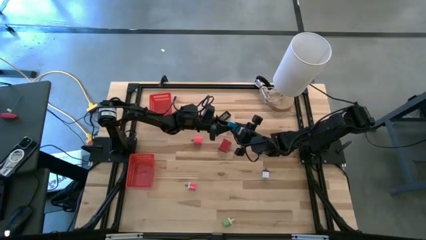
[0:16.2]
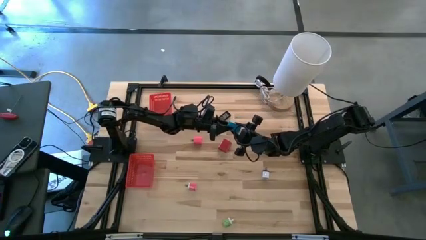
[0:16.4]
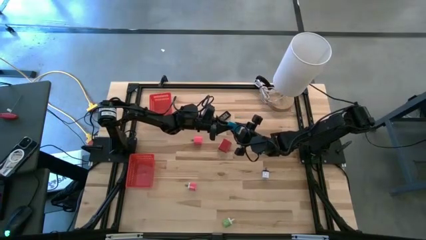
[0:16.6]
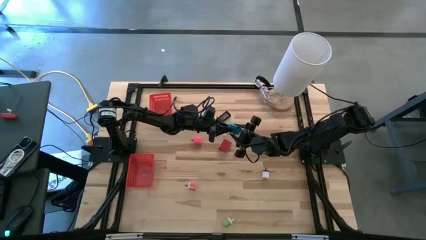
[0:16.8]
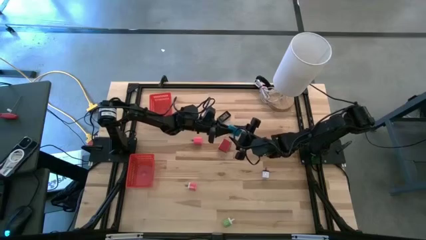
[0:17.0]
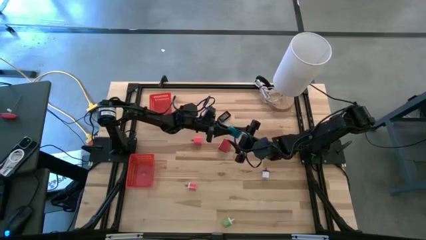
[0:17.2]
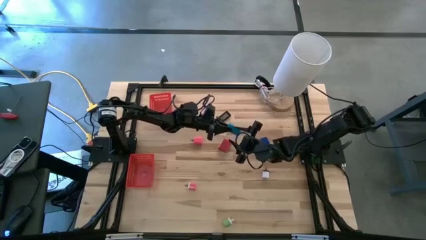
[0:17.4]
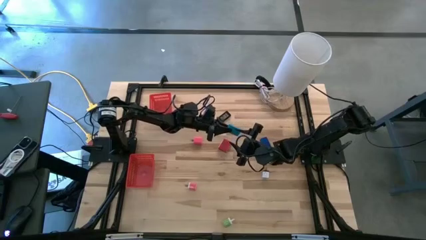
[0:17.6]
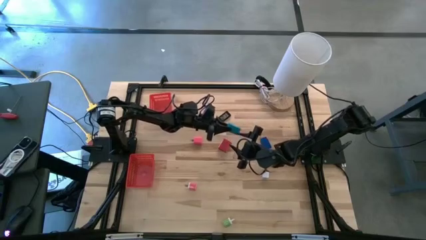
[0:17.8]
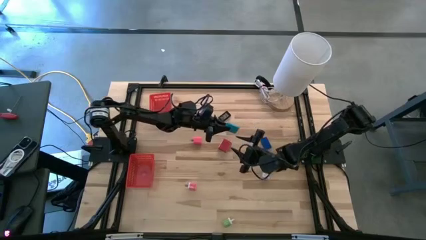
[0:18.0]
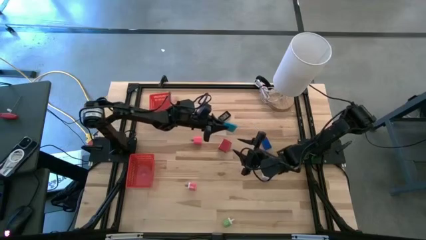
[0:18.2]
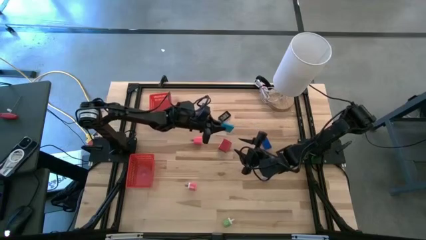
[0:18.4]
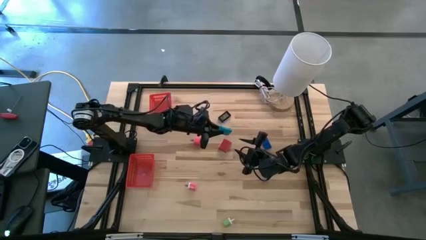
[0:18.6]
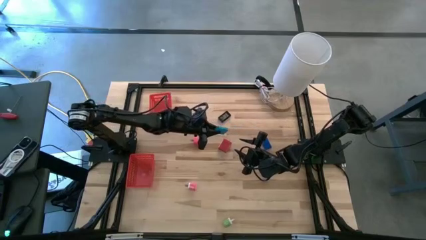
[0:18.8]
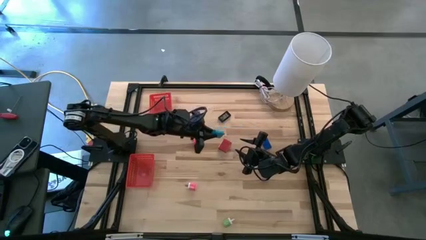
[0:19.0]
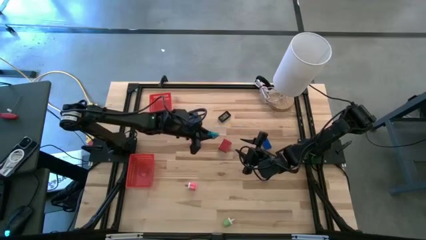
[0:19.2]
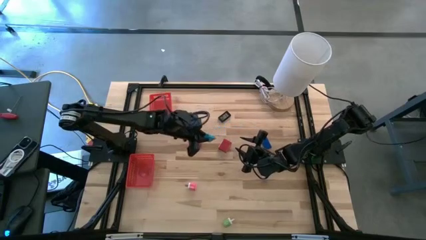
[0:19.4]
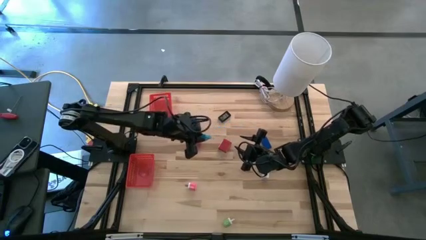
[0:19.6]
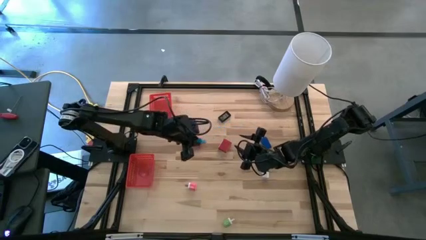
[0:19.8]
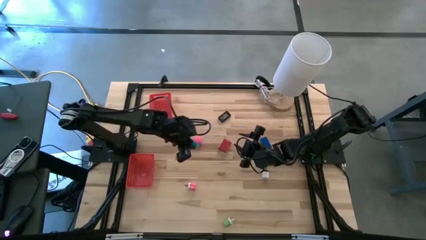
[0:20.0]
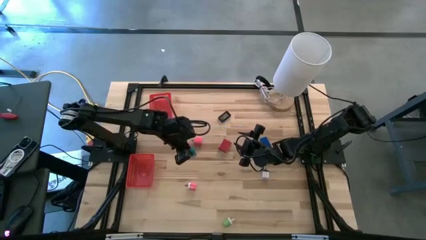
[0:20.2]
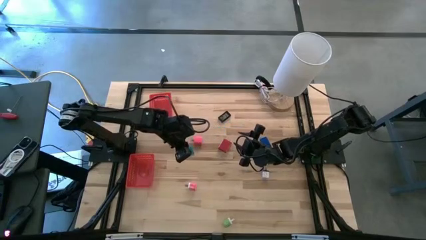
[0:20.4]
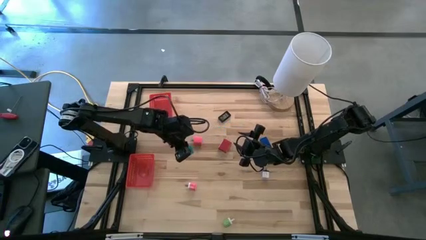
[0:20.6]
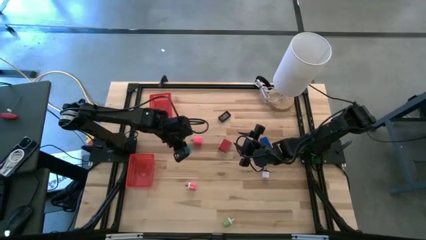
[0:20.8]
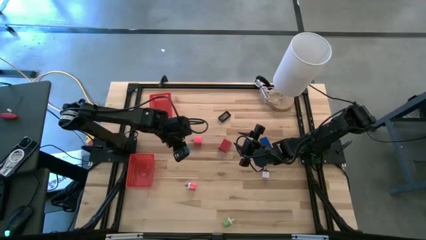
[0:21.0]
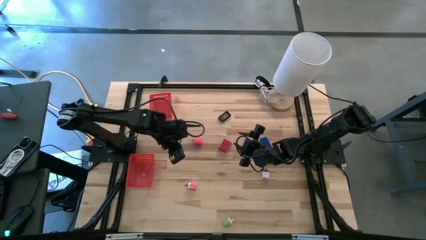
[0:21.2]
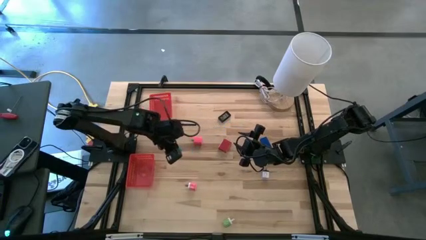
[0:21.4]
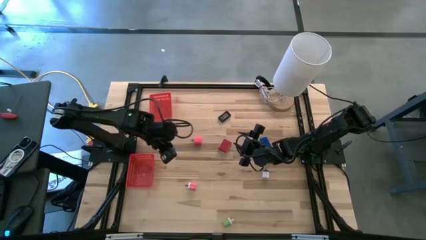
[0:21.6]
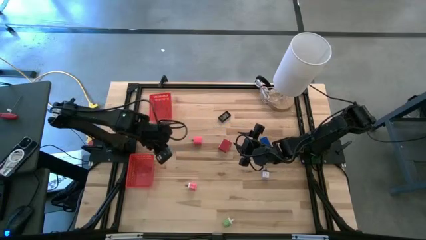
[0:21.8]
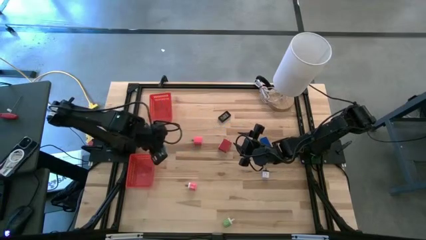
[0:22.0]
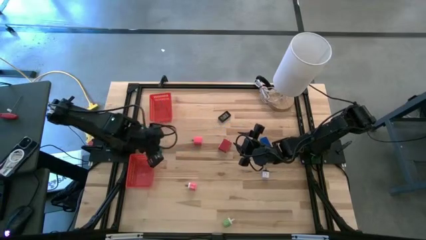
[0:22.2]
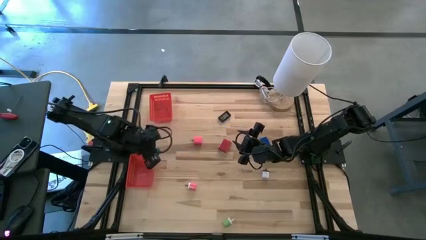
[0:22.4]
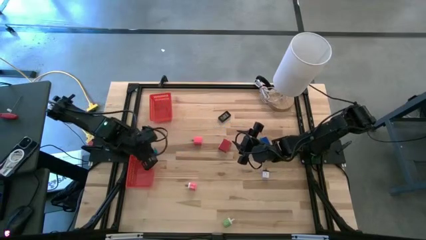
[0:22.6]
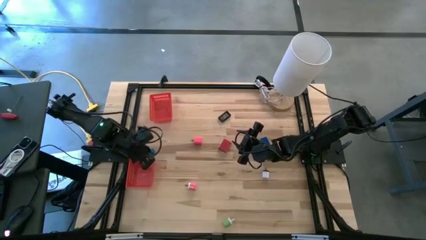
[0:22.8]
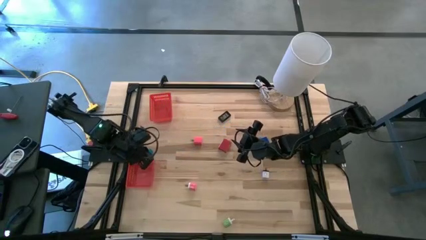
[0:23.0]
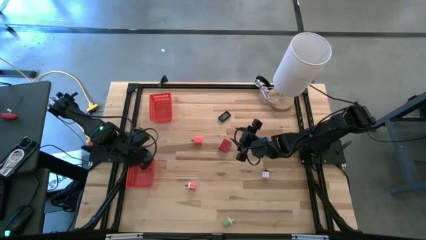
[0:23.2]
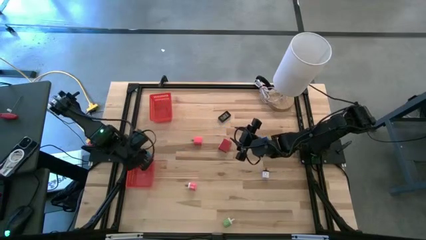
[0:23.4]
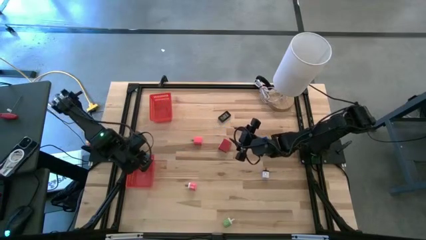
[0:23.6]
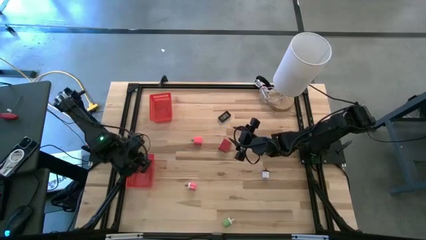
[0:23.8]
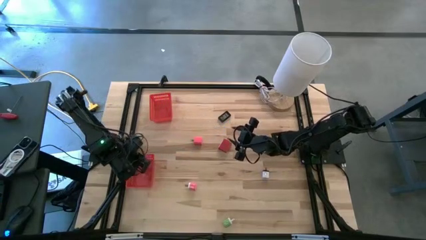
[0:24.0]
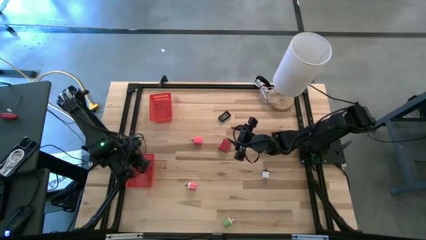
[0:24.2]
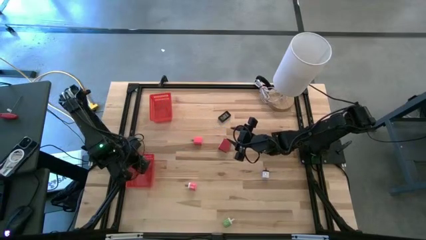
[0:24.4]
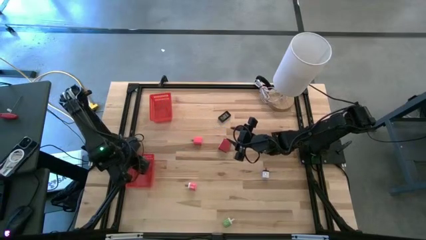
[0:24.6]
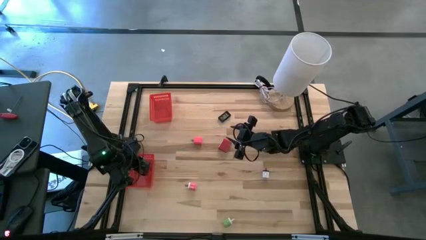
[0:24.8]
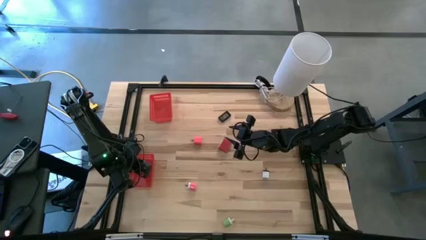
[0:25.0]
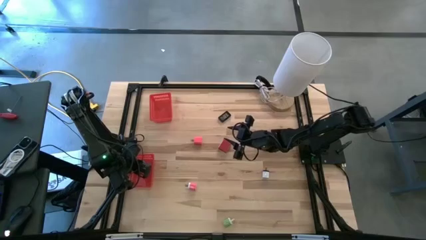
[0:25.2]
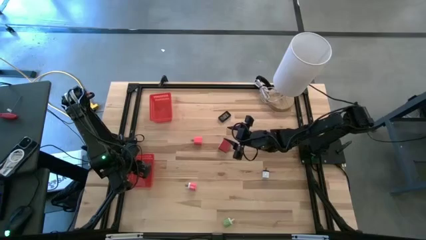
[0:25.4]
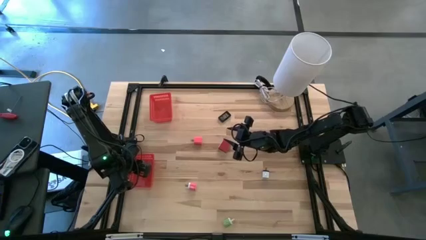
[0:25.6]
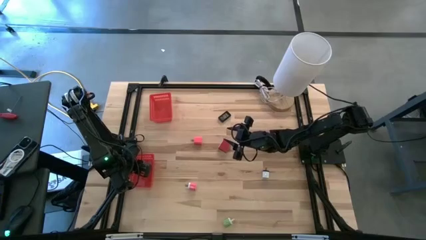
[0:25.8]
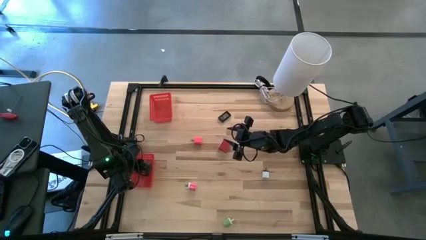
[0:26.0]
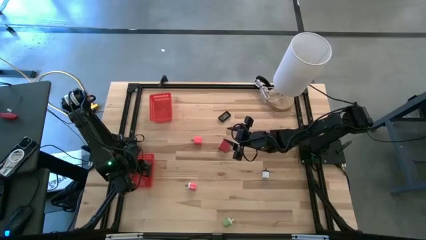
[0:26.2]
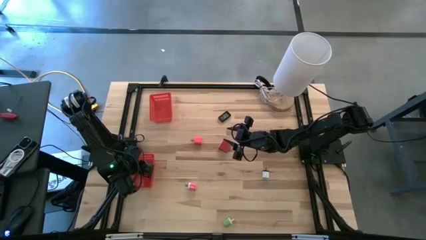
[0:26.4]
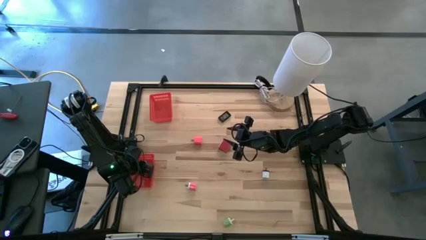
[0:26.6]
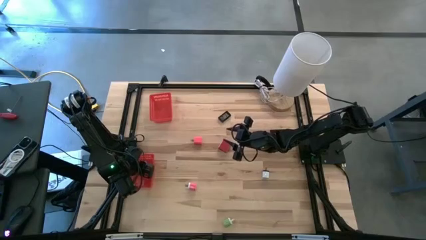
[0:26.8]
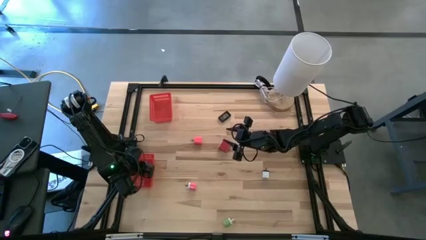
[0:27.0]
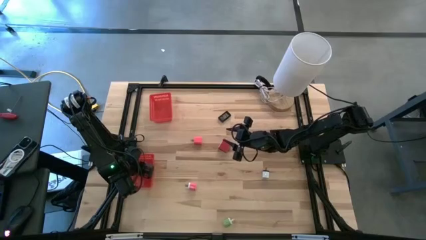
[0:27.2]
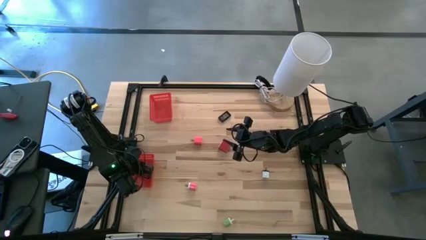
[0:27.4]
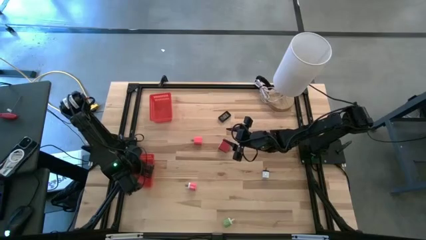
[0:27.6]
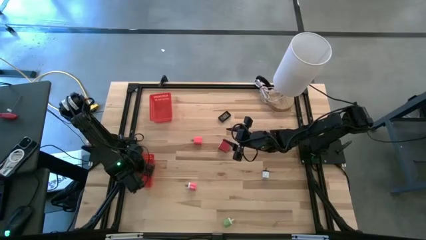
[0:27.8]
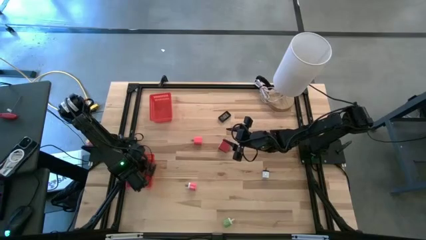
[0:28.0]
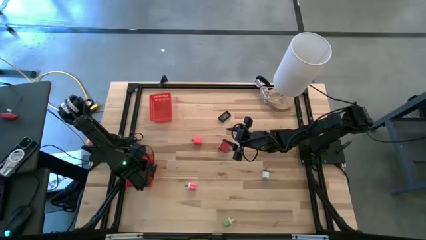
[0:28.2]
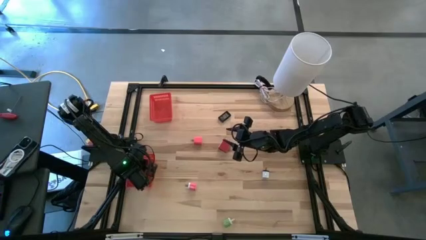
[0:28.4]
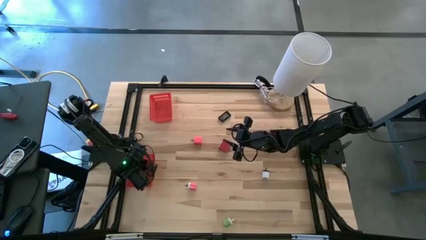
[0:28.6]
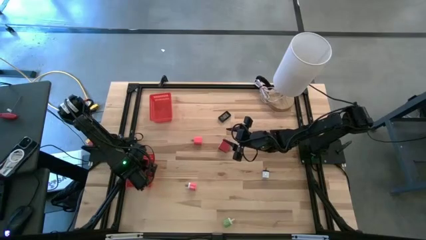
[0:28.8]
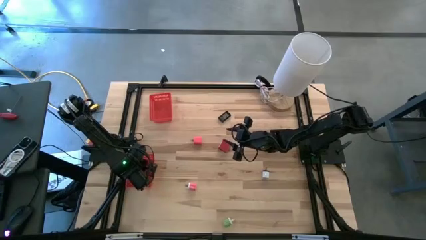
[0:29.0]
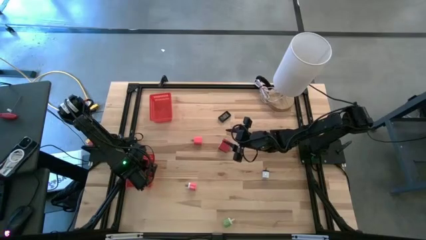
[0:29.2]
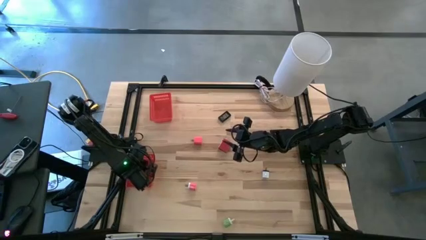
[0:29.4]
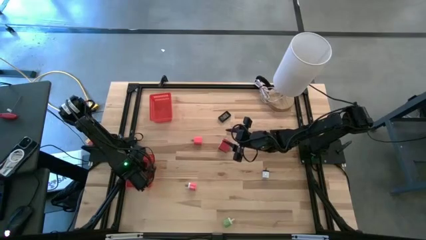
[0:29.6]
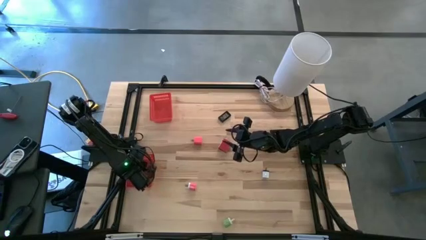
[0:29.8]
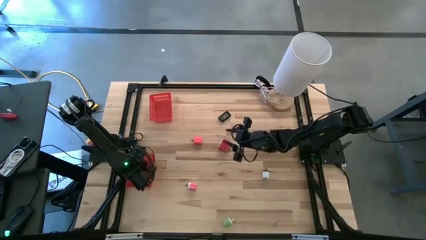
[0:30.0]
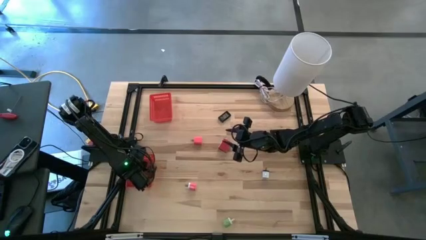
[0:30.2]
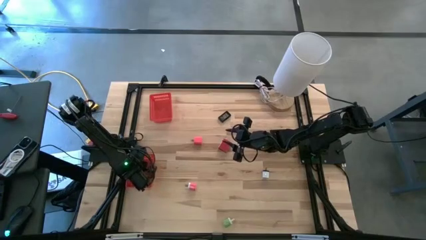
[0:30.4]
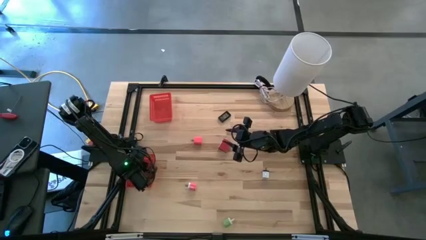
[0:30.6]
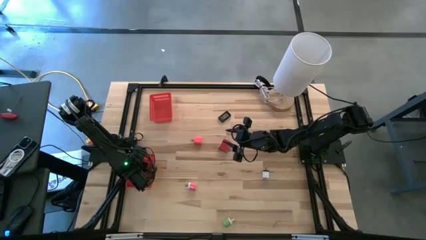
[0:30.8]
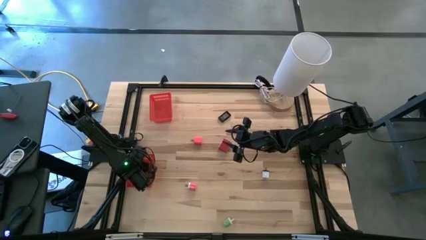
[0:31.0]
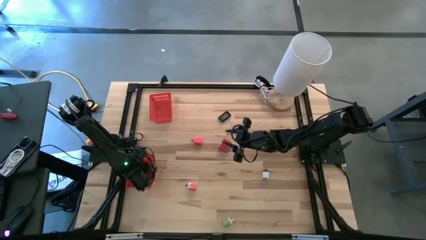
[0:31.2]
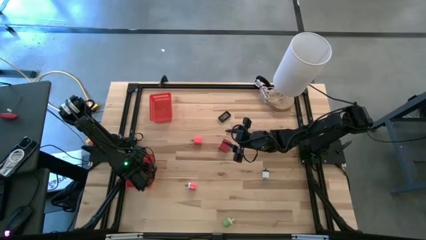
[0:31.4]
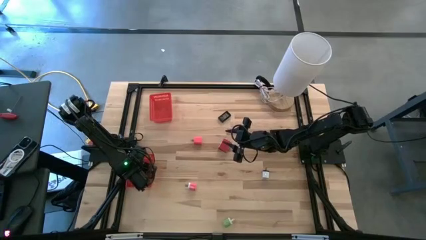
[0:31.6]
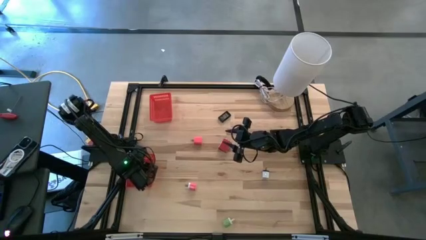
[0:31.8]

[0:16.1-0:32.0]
Task: Pick & Place Office items
Put the light blue digital clock into the bottom red bin
